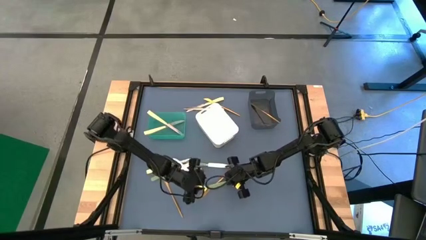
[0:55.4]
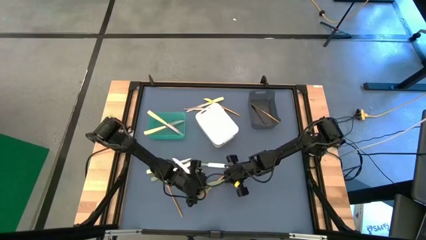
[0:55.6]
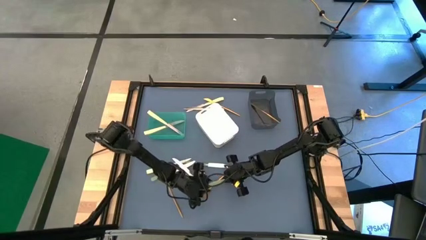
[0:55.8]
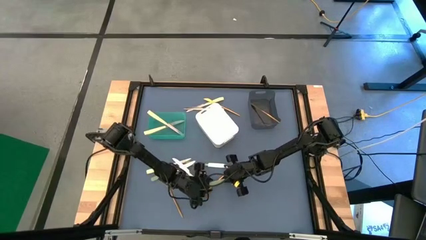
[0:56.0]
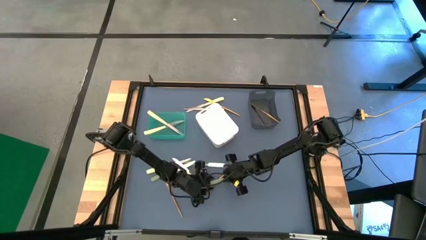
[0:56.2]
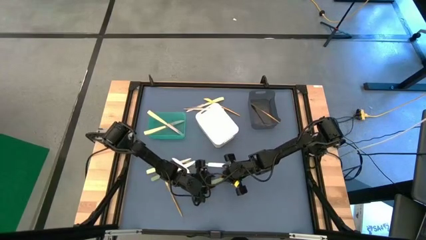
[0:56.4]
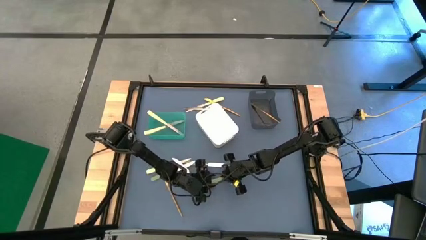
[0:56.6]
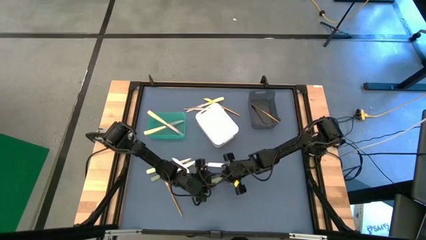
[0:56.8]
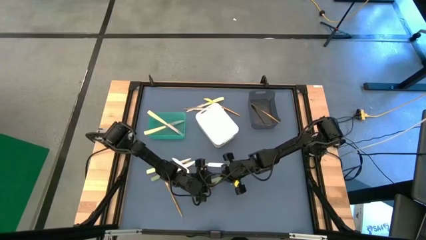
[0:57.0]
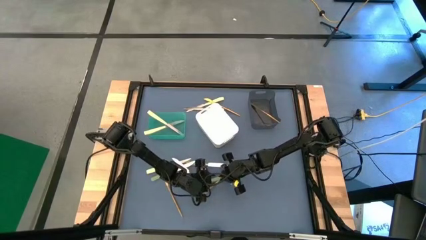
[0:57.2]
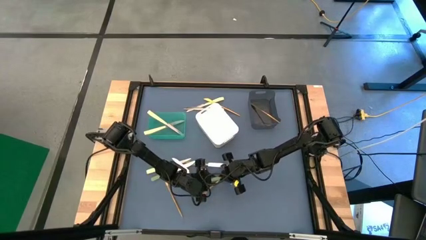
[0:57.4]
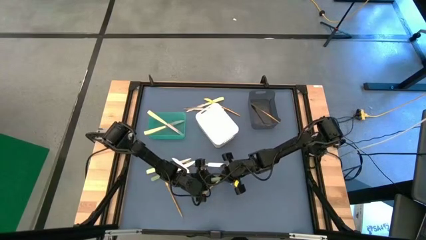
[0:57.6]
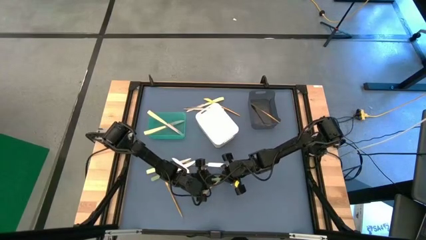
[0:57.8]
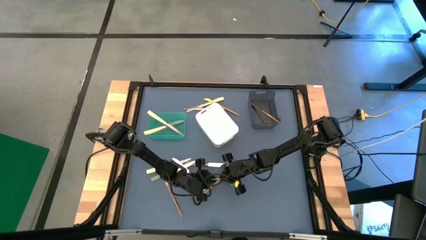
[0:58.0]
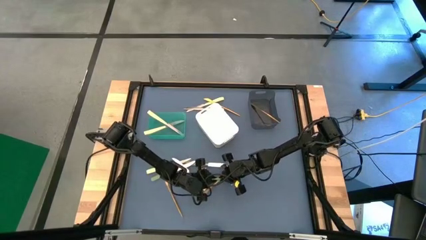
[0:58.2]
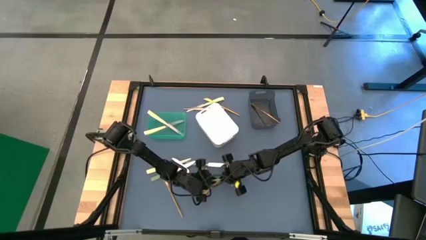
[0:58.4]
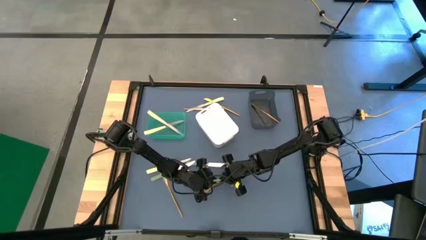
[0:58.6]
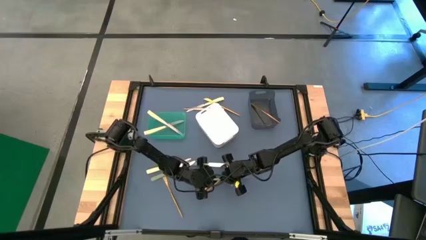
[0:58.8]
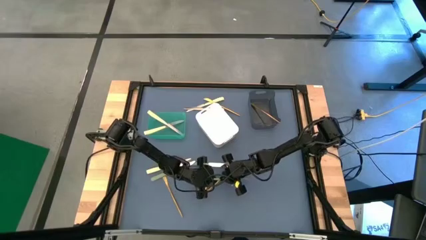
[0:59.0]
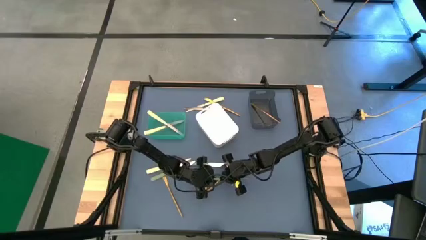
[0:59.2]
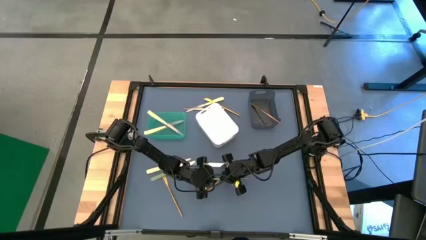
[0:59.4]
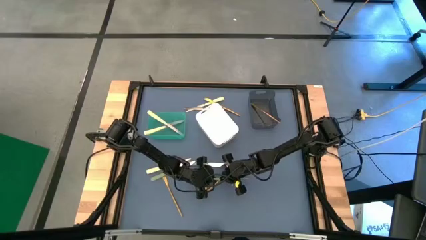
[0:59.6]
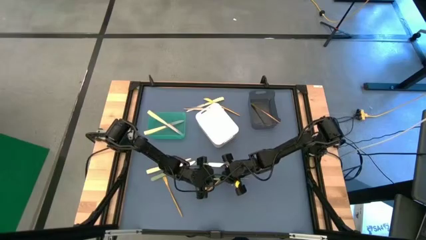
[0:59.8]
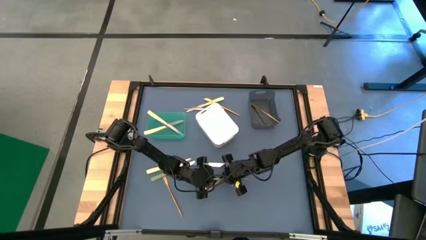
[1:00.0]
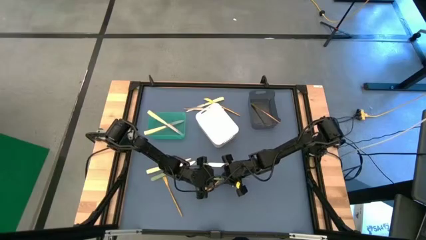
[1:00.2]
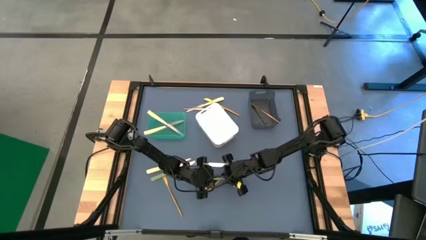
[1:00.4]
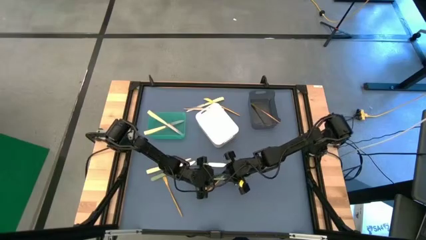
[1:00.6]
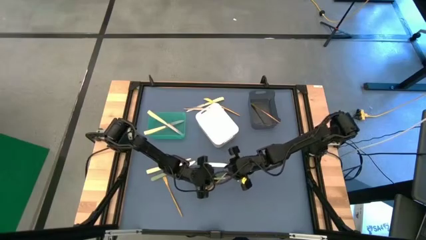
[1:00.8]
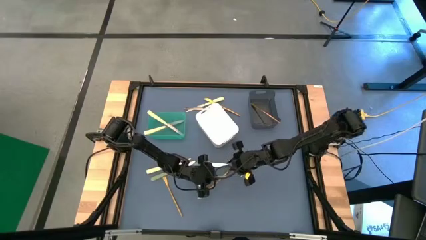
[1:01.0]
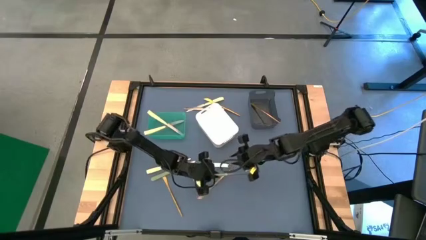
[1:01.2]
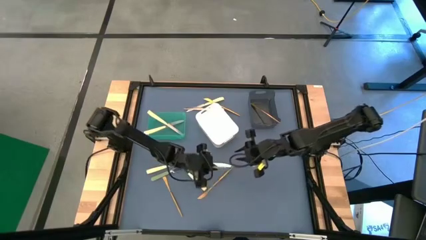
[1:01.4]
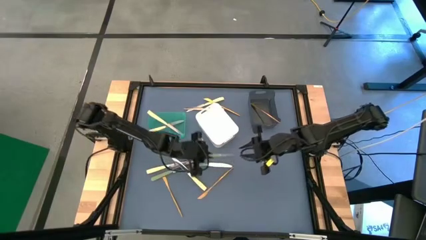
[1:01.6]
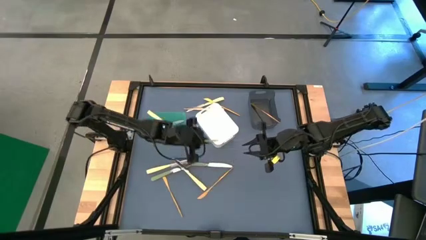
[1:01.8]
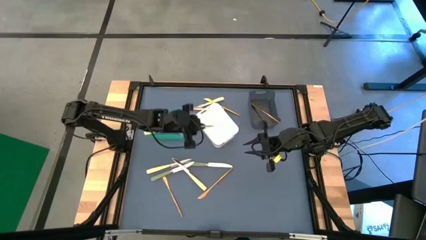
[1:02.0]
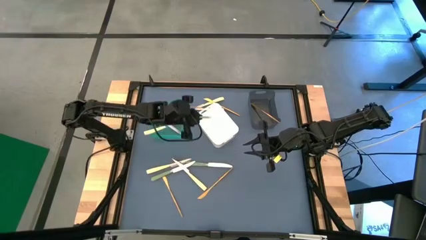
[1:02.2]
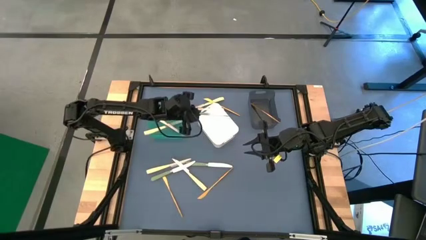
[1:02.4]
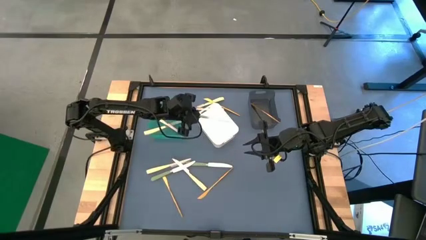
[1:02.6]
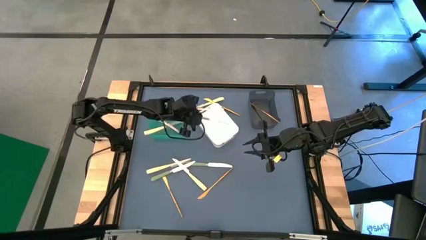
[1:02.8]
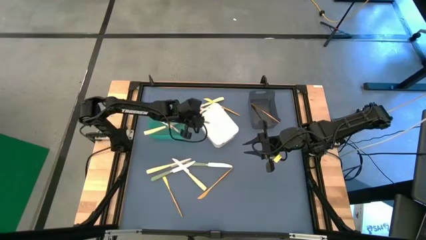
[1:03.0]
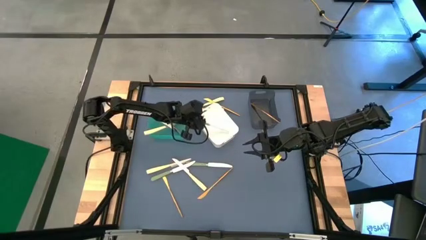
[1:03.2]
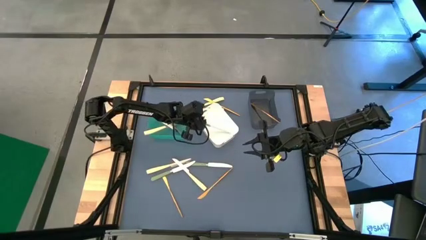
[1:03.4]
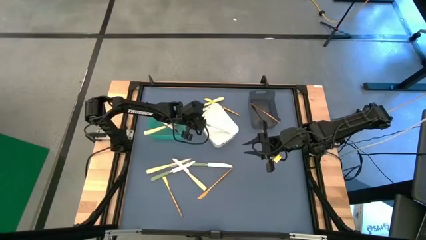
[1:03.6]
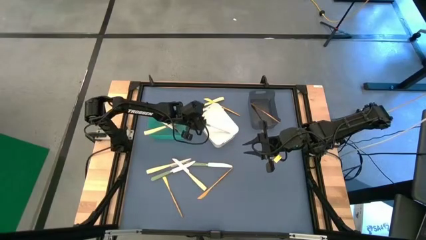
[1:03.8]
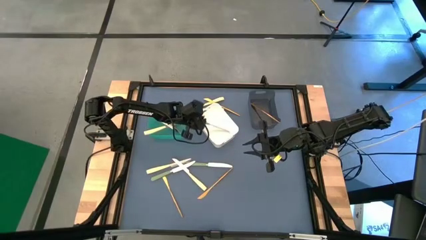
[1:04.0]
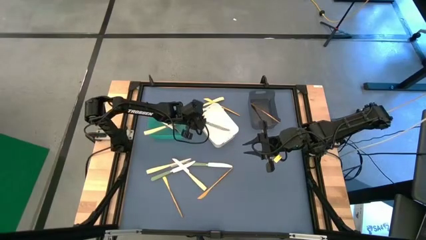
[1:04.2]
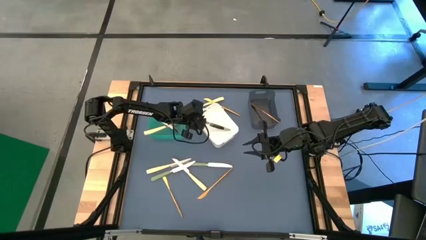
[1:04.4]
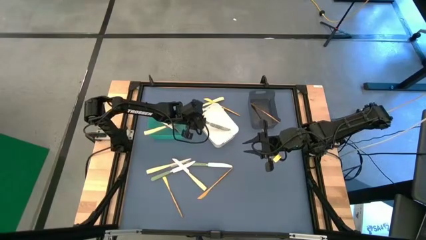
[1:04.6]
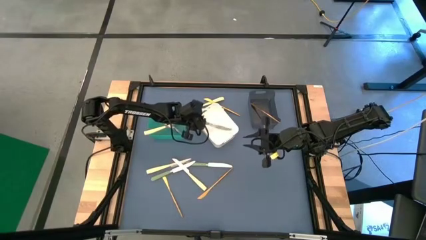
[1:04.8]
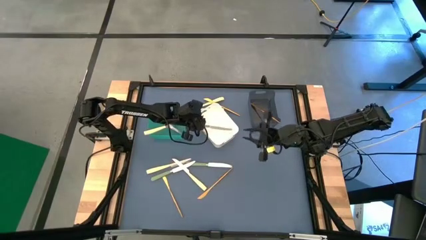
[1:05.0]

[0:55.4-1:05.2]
Task: Sort silverware by color (type)
Put the right green table knife into the white bin
